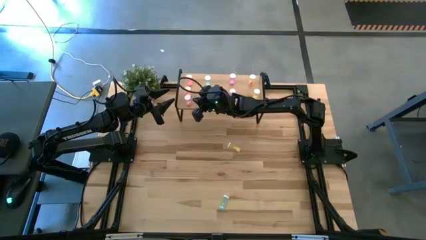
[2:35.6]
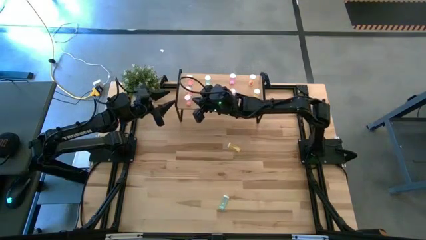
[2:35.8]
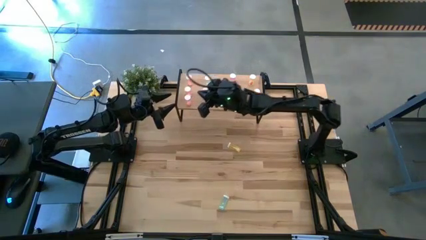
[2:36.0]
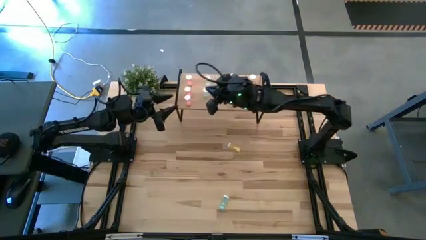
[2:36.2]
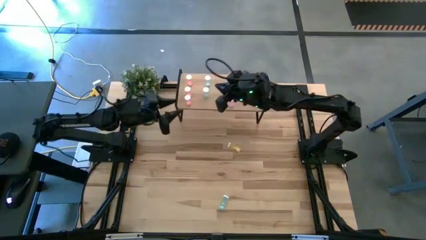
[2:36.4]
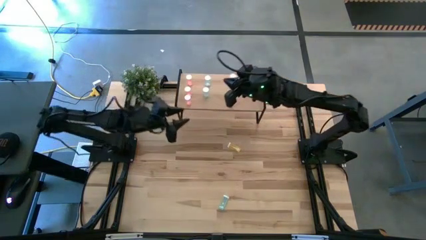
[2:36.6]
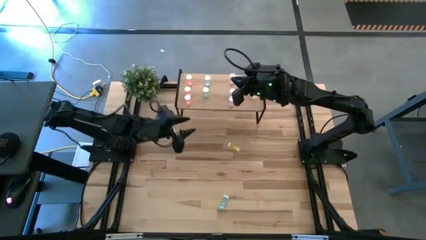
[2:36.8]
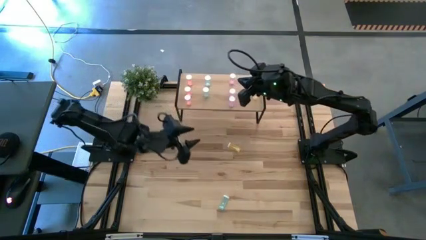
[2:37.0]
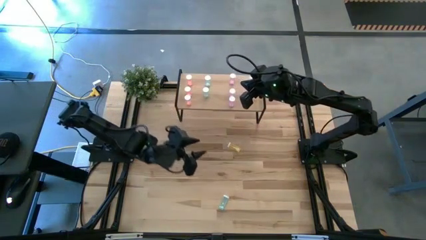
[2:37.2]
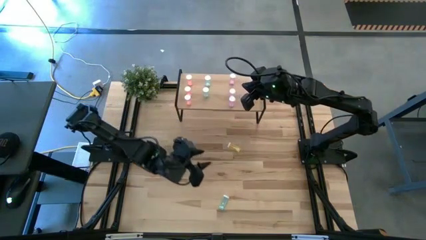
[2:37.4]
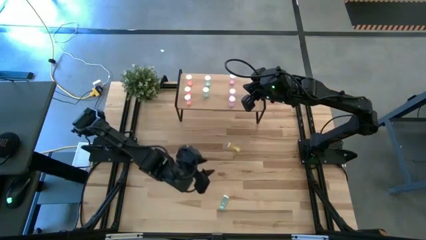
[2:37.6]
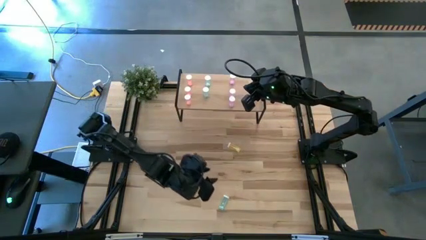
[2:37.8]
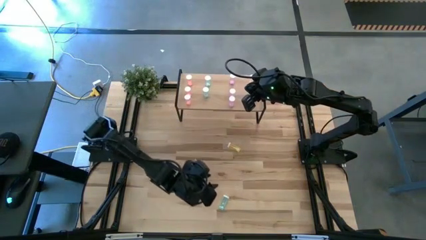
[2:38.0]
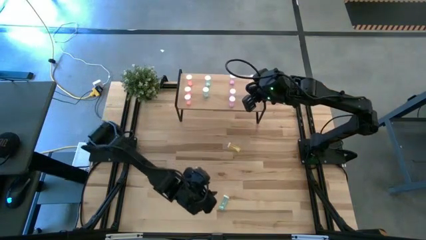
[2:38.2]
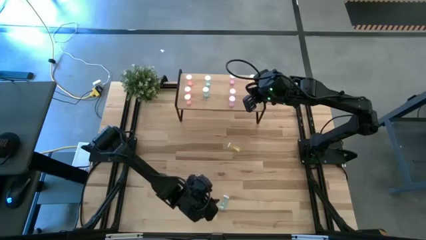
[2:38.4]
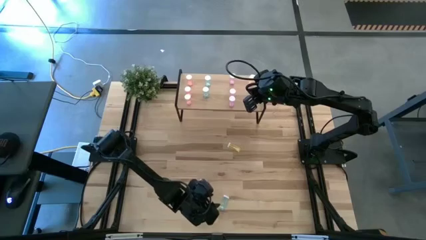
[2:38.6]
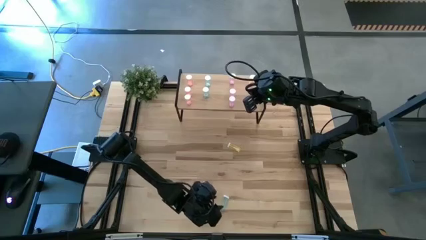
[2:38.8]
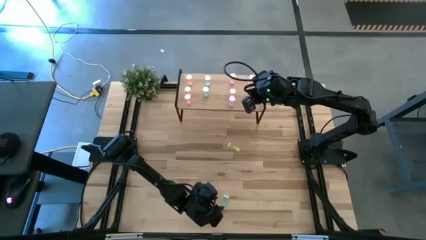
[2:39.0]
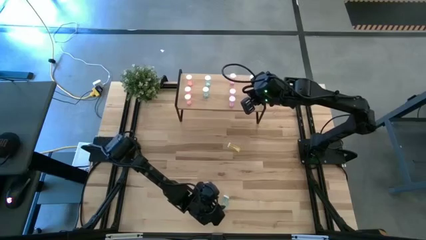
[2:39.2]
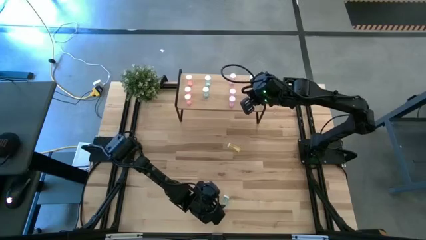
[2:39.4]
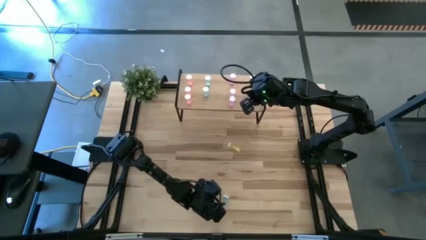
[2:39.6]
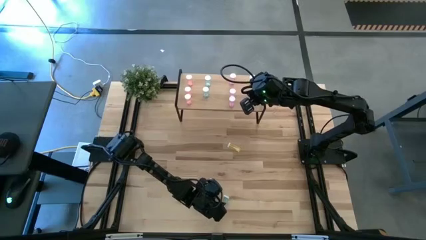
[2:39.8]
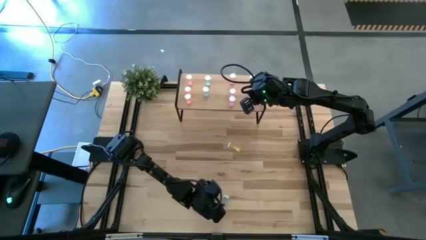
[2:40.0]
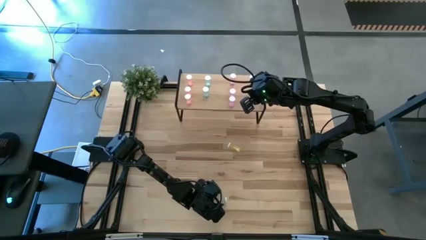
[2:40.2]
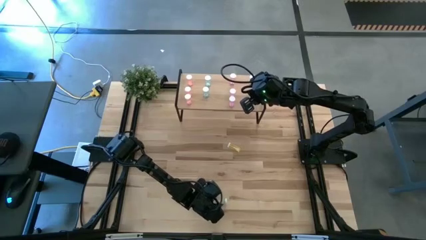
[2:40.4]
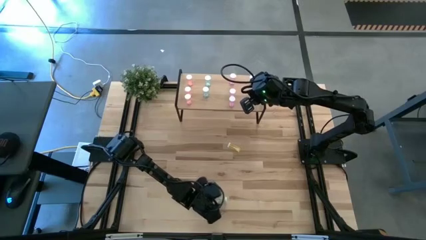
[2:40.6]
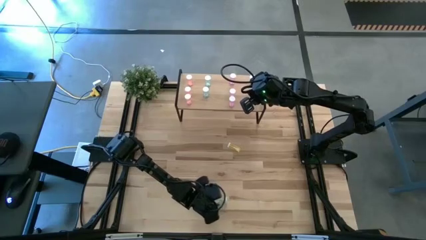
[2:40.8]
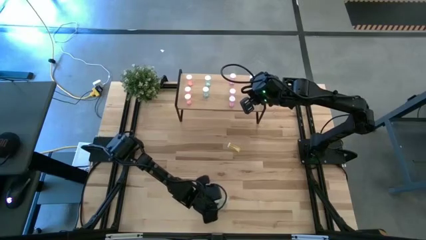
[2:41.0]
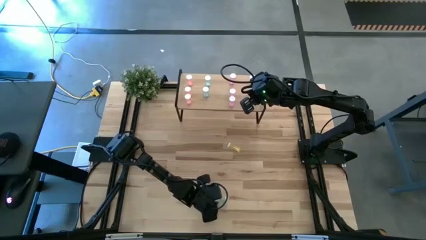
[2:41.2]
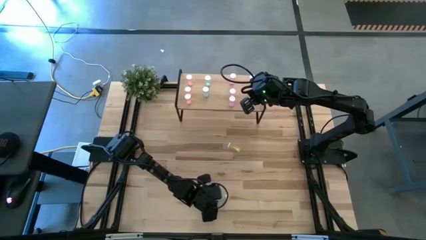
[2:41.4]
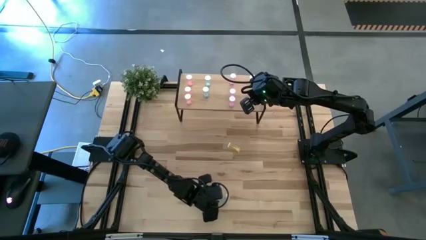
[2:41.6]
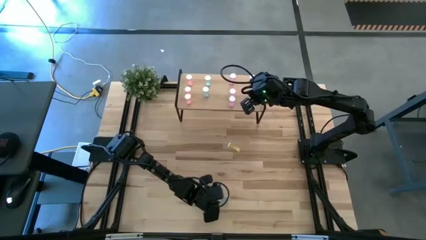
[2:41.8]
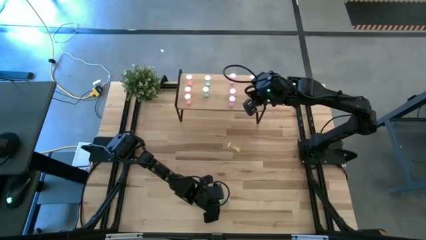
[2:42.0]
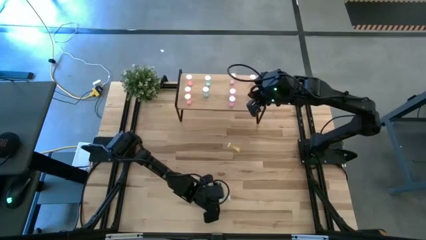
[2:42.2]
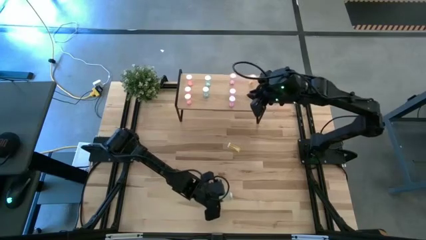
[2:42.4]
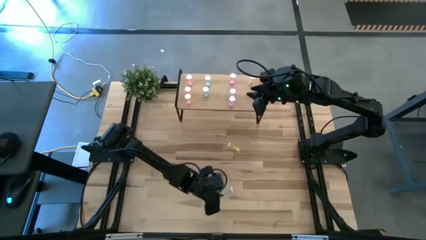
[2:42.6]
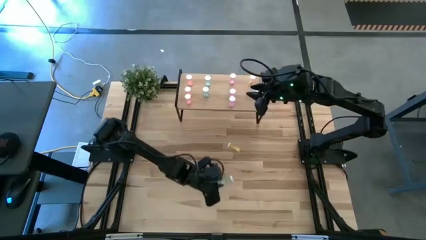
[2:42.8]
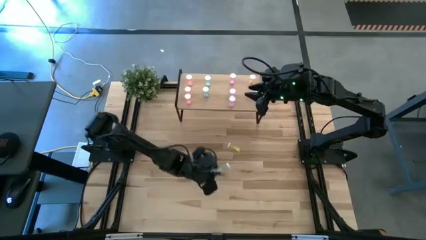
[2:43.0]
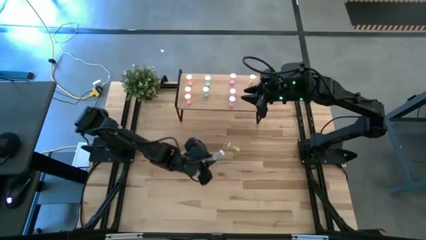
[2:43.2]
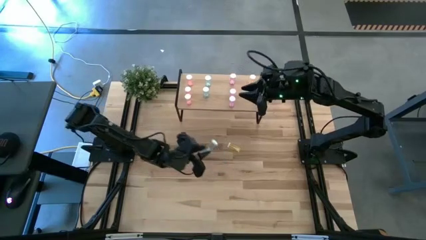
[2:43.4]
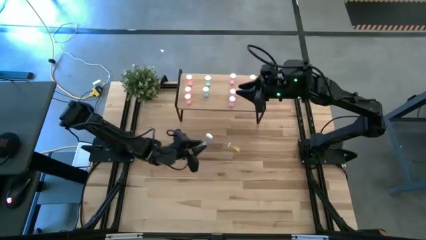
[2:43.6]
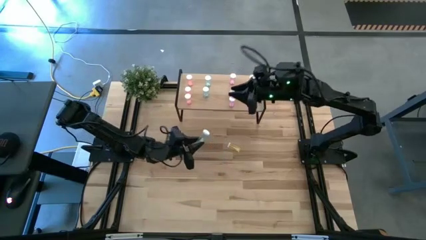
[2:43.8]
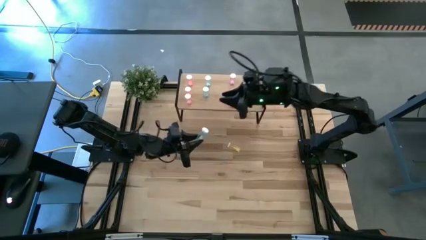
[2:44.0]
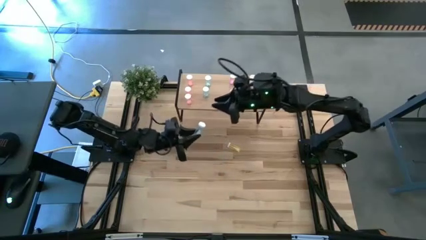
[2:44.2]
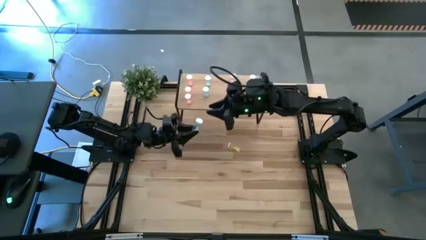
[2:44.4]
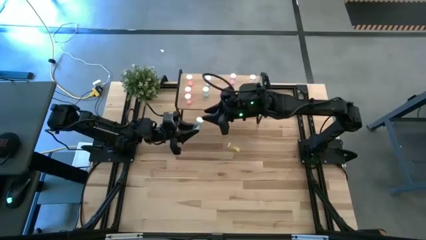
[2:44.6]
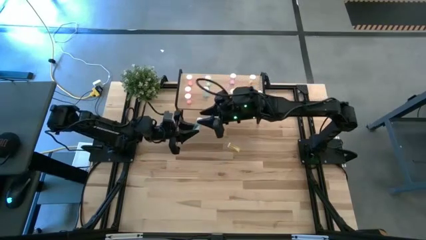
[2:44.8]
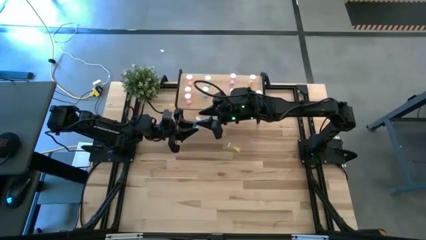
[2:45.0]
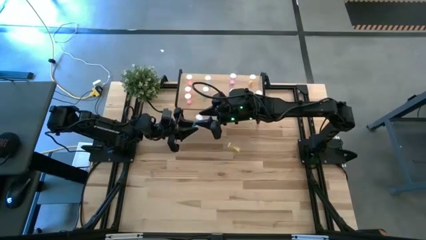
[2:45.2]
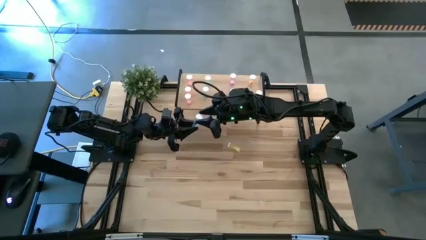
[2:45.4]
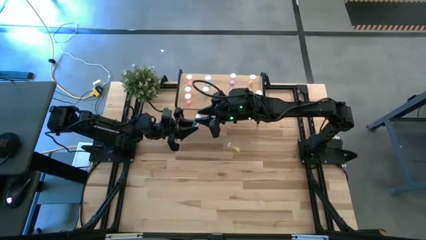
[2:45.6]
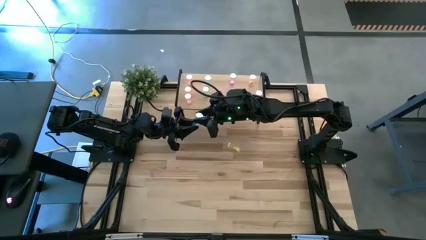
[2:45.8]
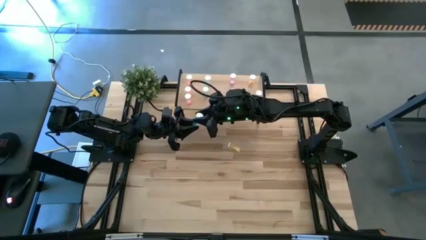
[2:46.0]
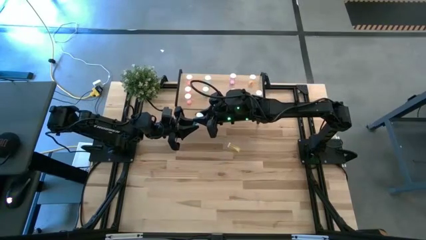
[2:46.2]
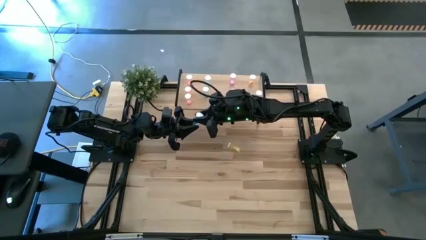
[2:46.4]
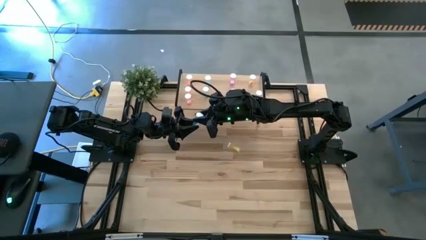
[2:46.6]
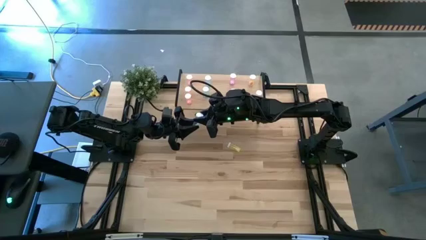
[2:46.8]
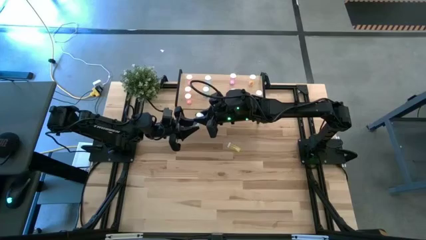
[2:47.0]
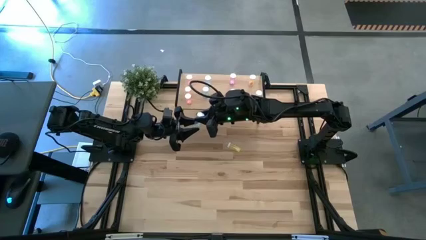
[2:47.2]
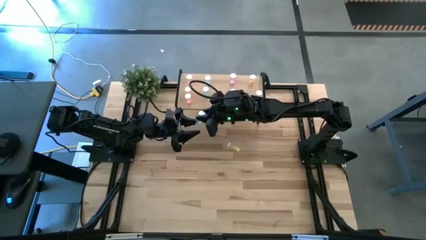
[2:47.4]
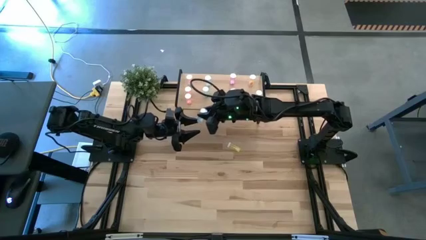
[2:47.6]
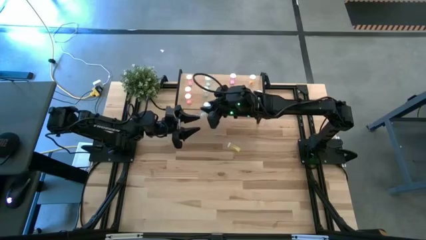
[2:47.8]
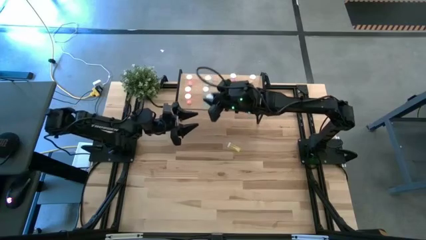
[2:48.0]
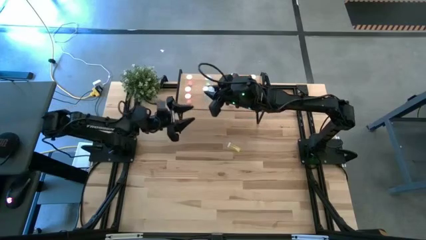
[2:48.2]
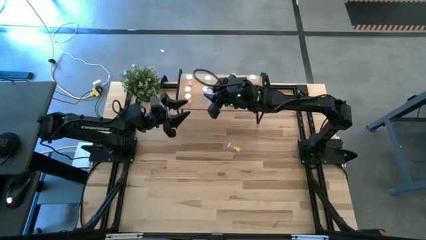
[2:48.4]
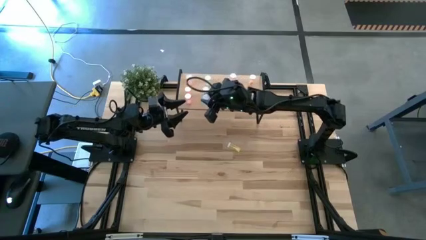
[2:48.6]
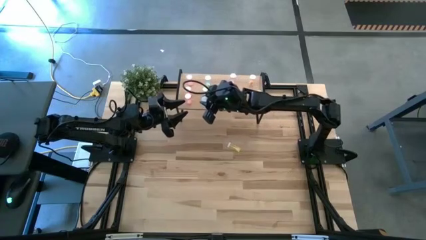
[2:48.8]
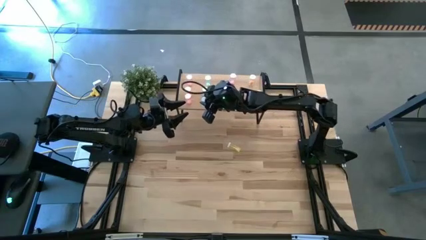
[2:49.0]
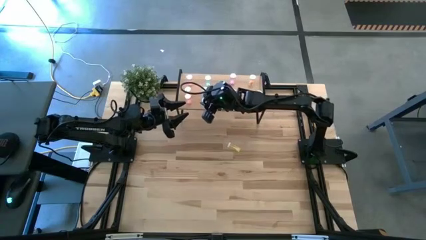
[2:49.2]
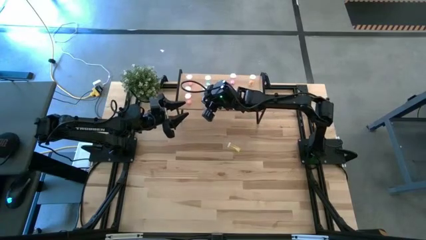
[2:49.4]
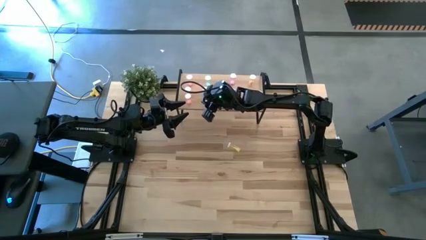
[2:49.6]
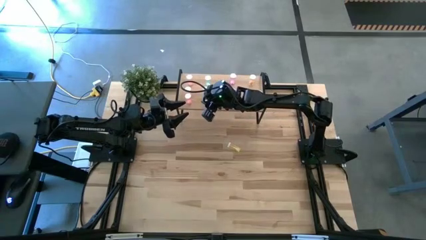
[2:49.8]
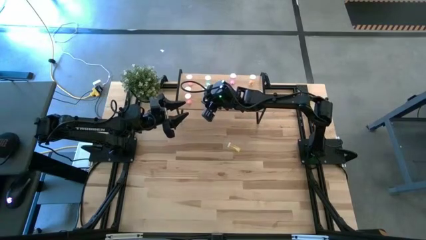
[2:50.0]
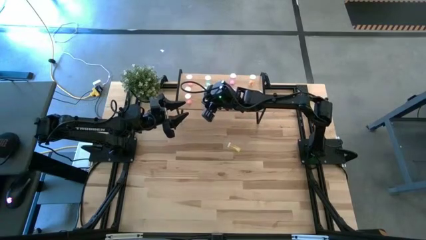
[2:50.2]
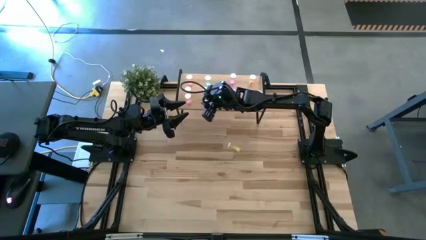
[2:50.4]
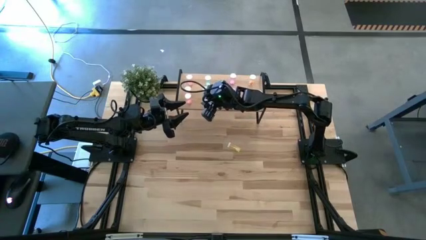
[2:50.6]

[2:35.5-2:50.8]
Task: Pick and place medicine bottles onto shelf by color
Put the blue pill bottle on the shelf aligned with the other blue pill bottles

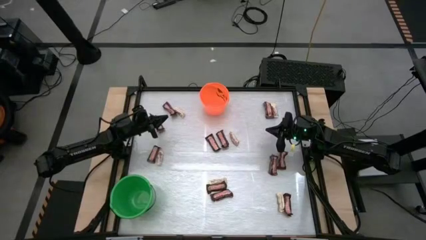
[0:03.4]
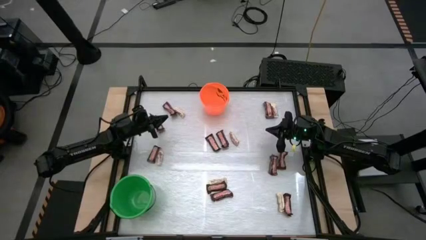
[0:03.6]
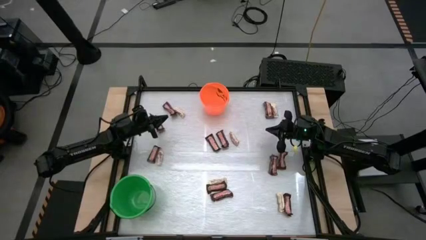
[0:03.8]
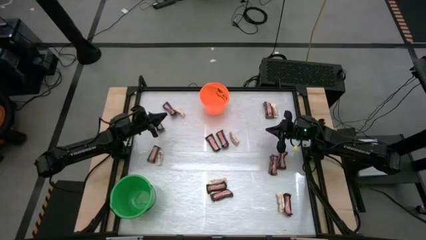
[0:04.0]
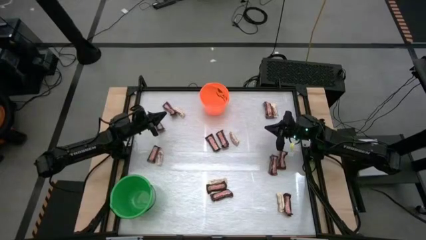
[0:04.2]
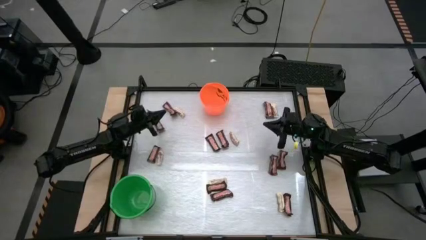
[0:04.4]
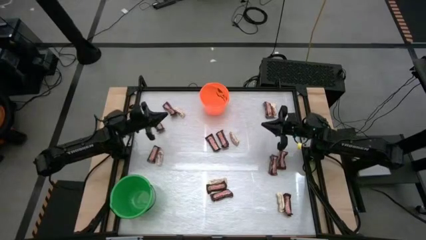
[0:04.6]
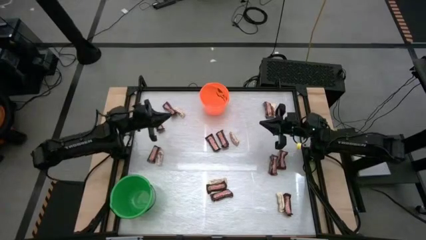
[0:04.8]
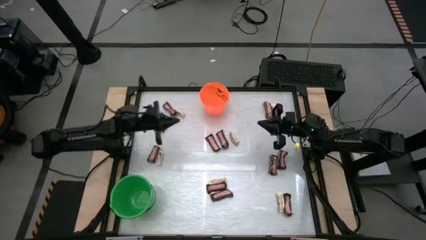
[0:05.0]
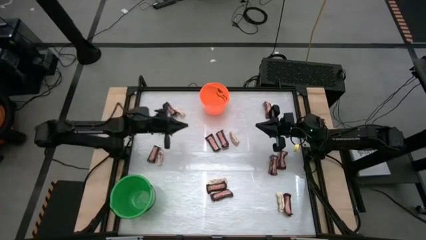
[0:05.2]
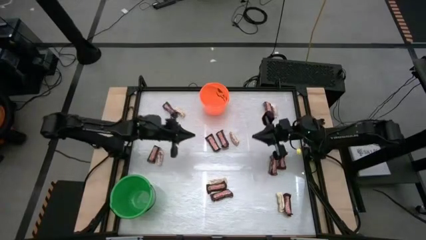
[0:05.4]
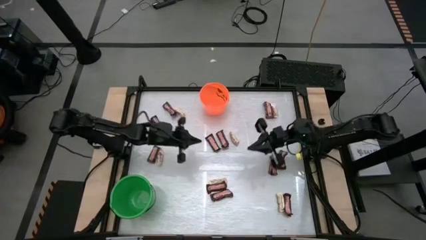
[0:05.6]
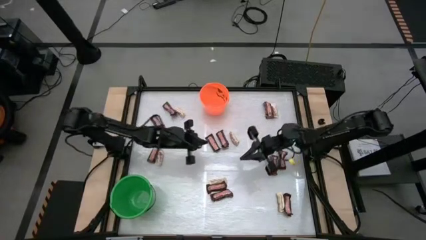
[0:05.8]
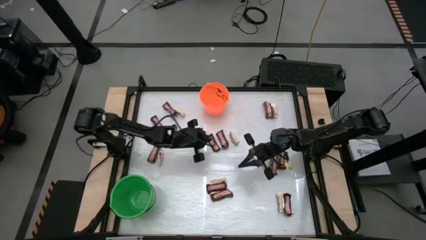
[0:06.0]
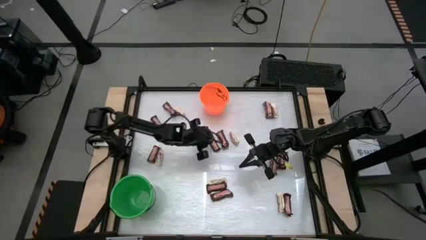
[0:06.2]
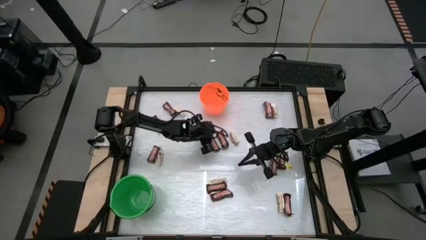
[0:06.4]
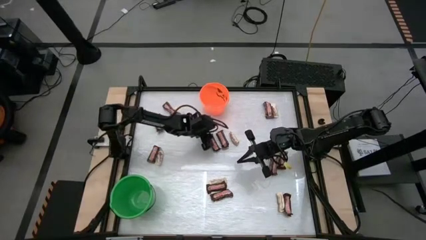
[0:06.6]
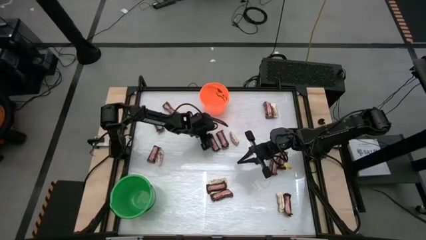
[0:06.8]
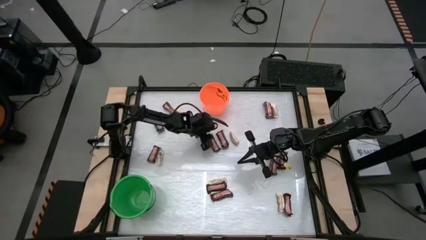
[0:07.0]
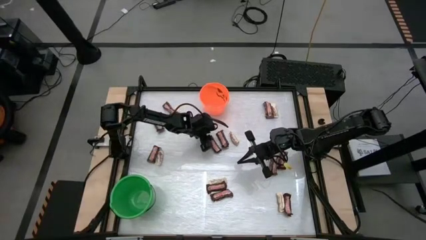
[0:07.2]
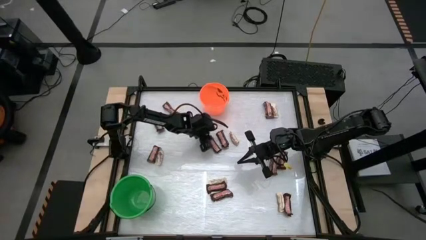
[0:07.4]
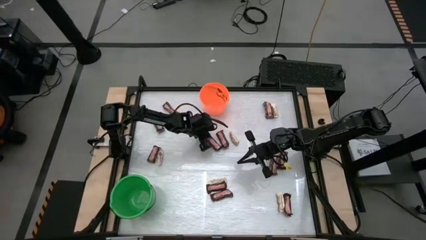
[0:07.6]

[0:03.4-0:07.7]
Task: Sort candy by brand, put in halloween buckets
Put the brown chocolate bar into the orange bucket
